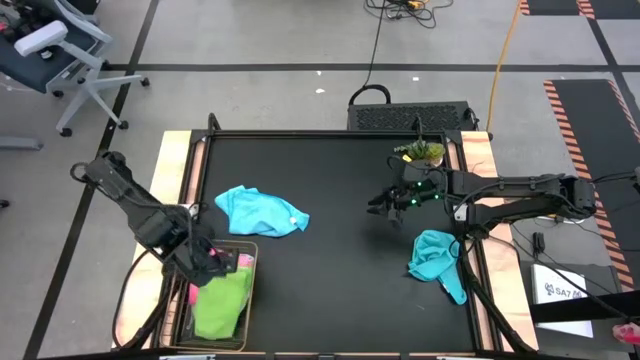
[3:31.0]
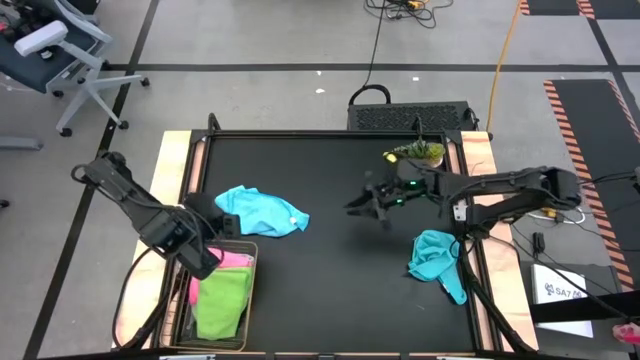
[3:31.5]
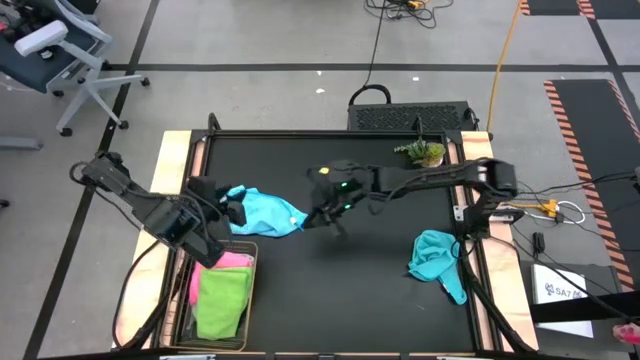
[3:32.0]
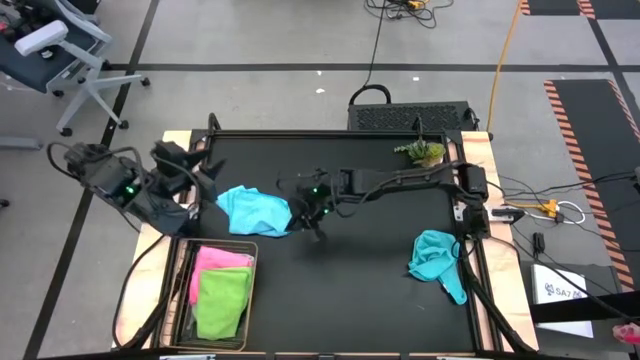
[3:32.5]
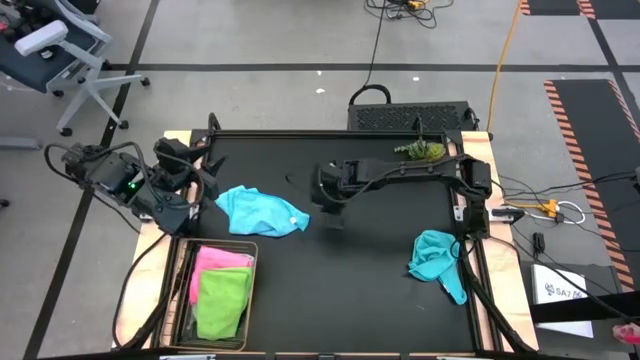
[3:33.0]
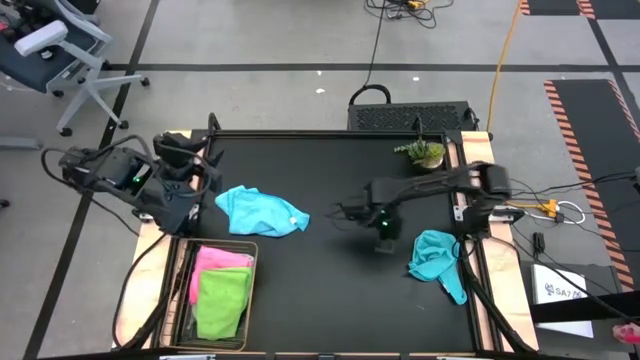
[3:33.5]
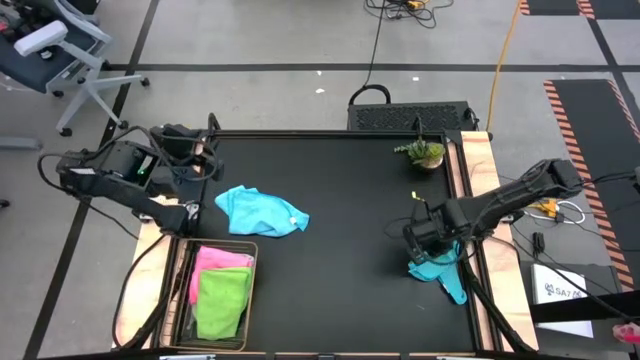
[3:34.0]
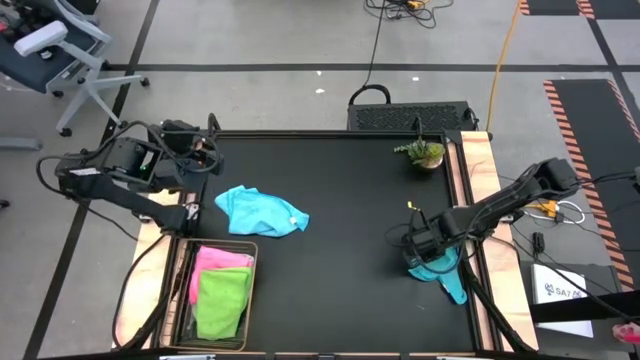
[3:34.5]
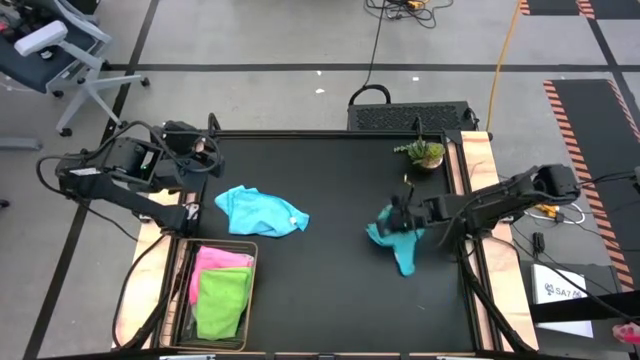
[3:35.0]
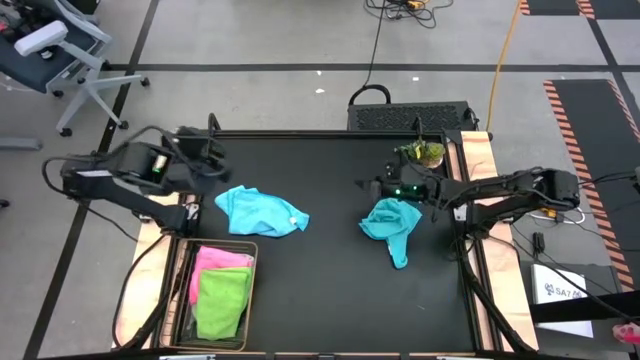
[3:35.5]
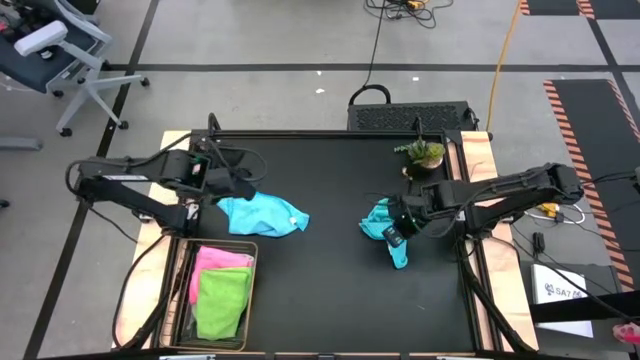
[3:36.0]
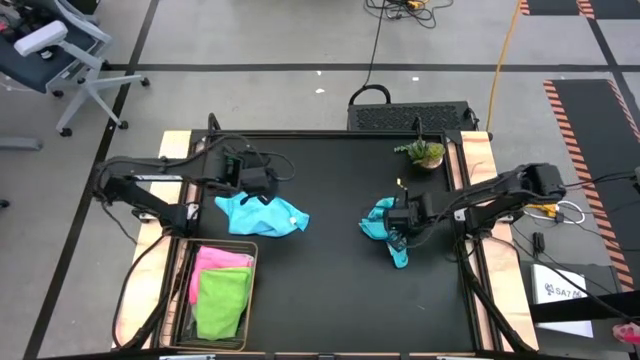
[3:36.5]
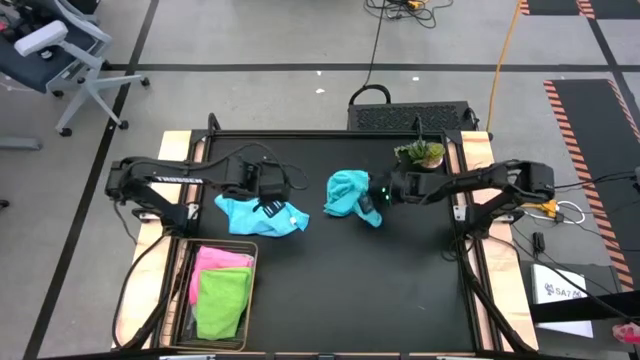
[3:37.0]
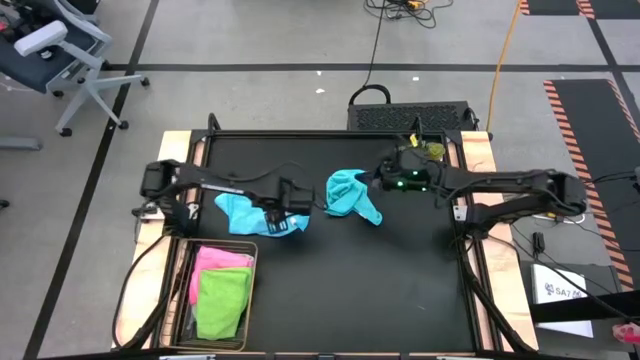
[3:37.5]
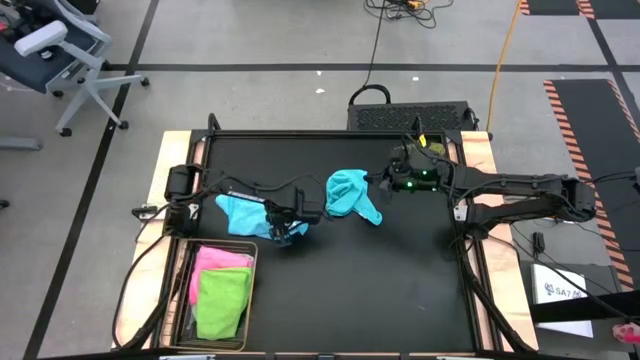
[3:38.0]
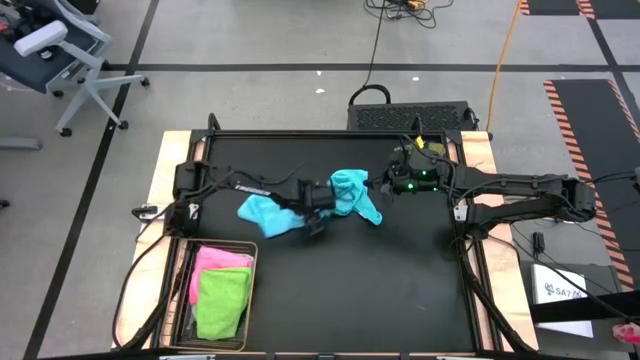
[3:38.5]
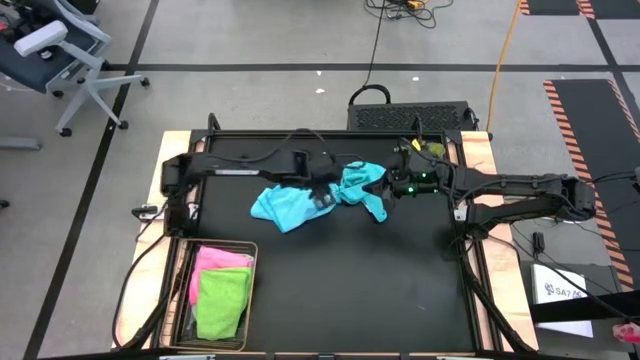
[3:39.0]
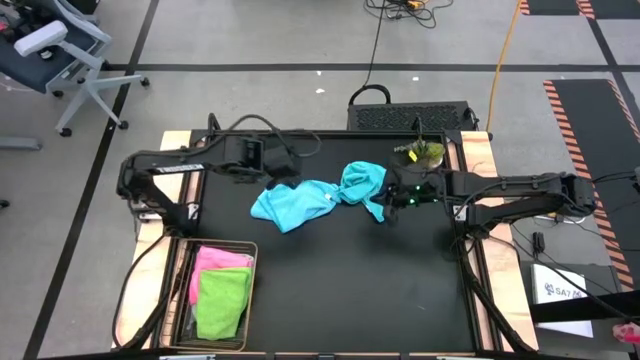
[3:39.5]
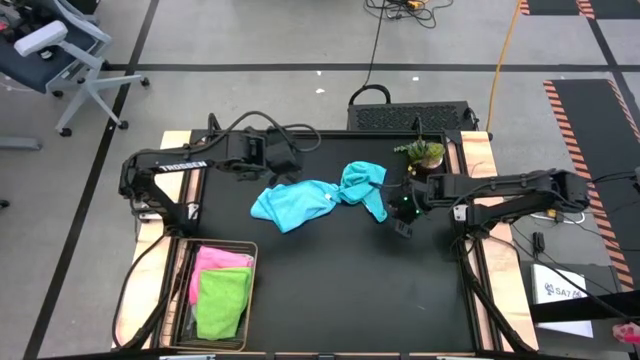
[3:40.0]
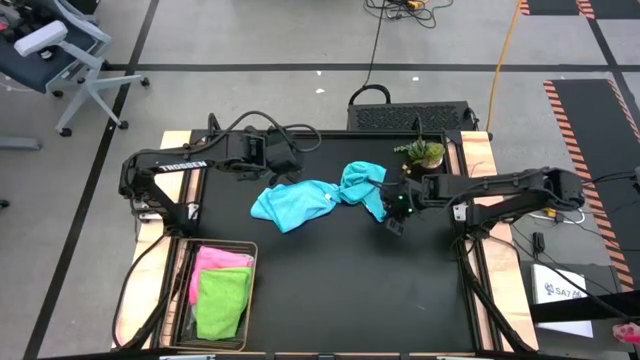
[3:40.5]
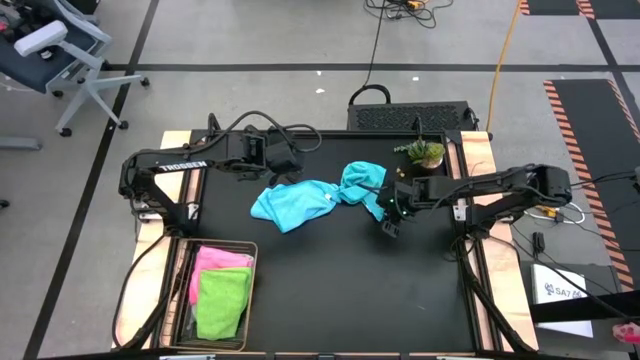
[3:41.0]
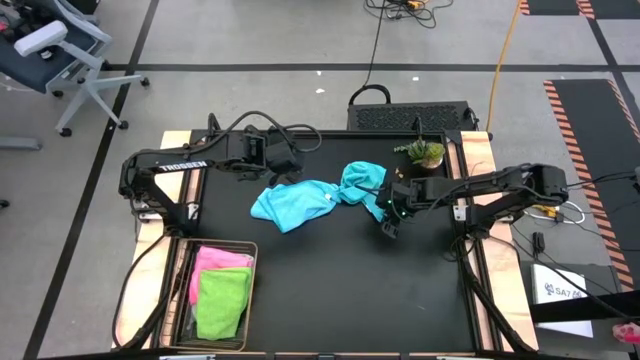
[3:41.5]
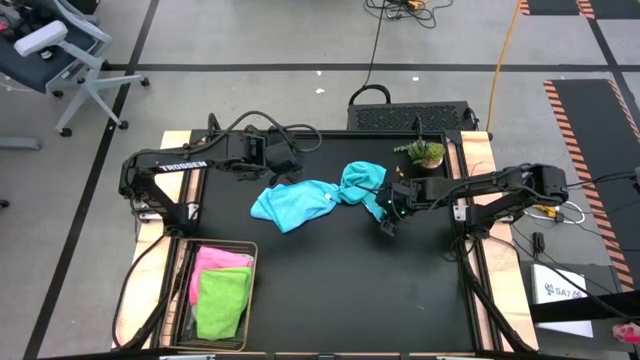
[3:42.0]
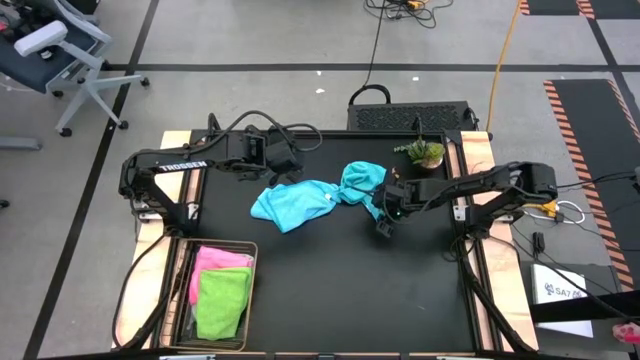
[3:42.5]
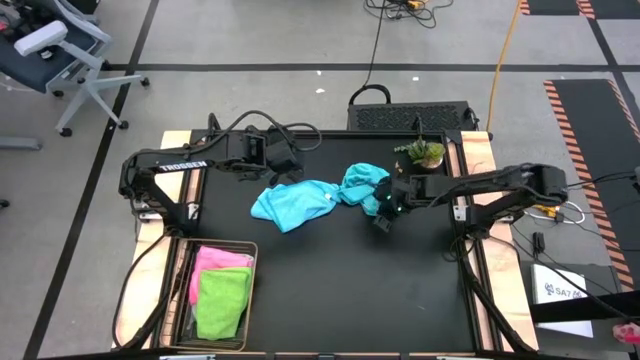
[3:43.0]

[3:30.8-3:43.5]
Task: Fold microfiber towels
Fold the right blue microfiber cloth

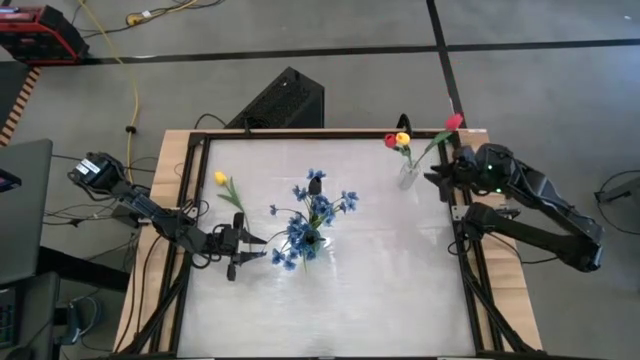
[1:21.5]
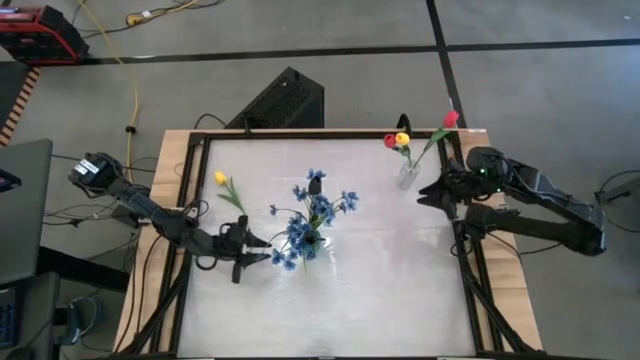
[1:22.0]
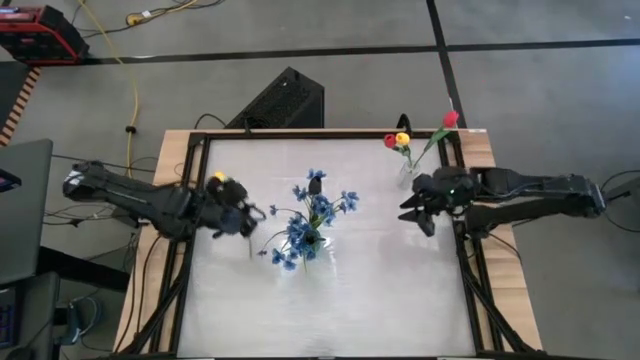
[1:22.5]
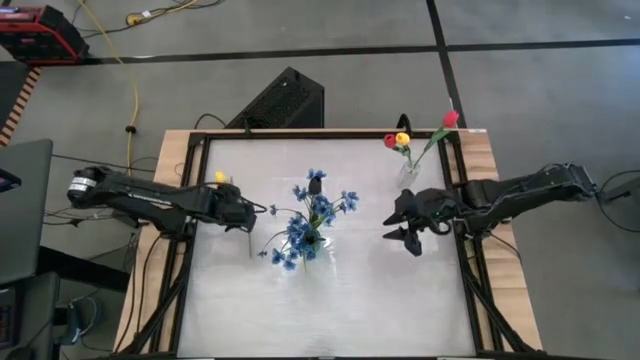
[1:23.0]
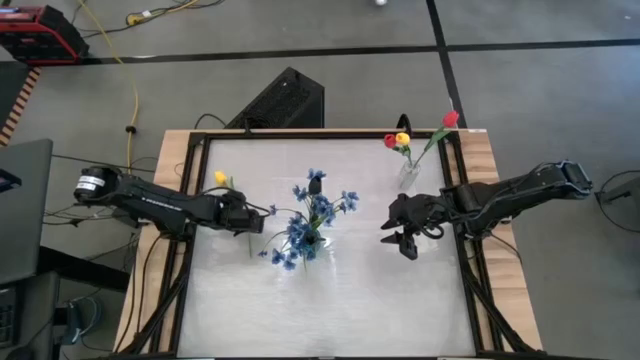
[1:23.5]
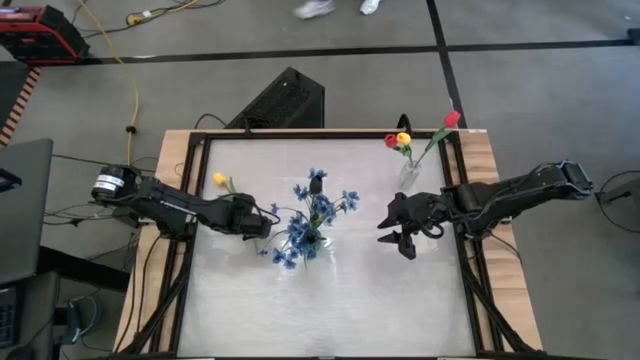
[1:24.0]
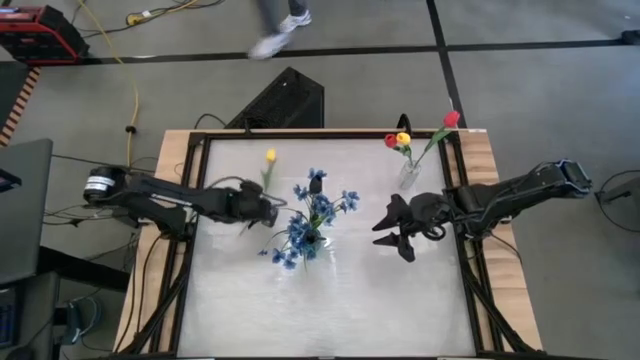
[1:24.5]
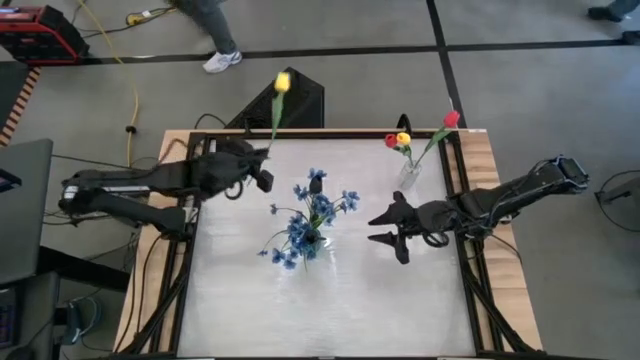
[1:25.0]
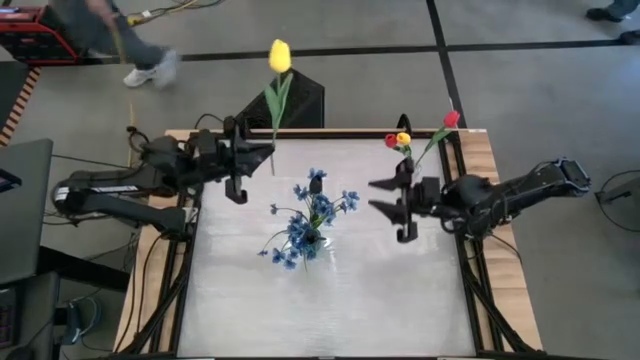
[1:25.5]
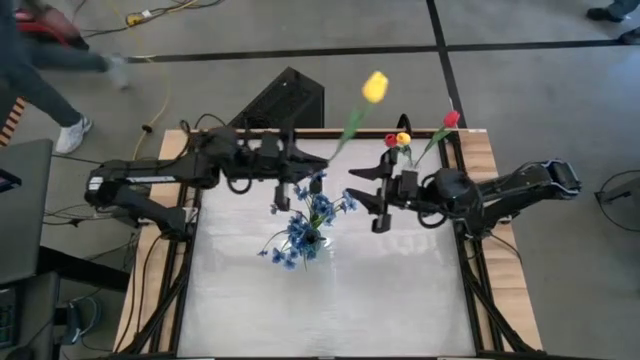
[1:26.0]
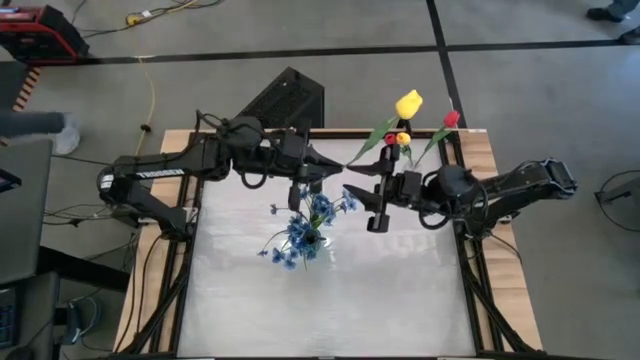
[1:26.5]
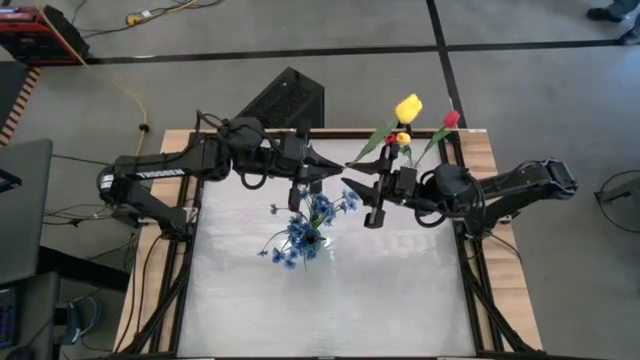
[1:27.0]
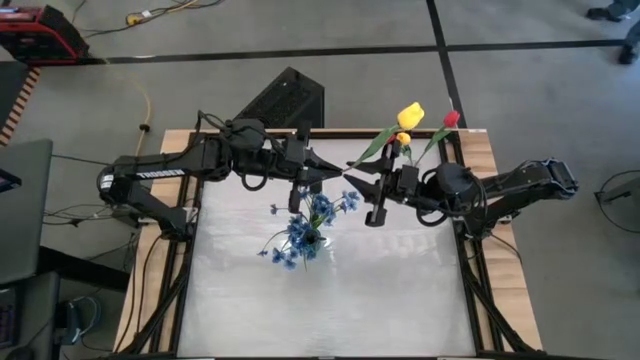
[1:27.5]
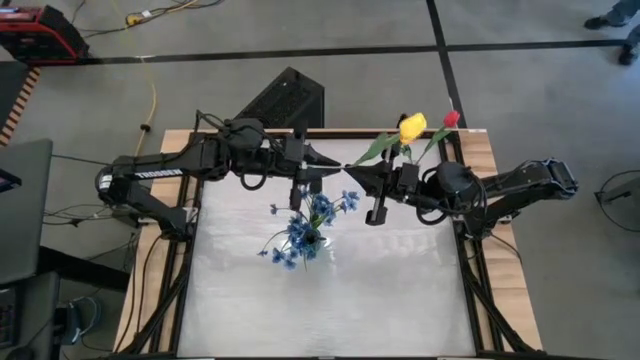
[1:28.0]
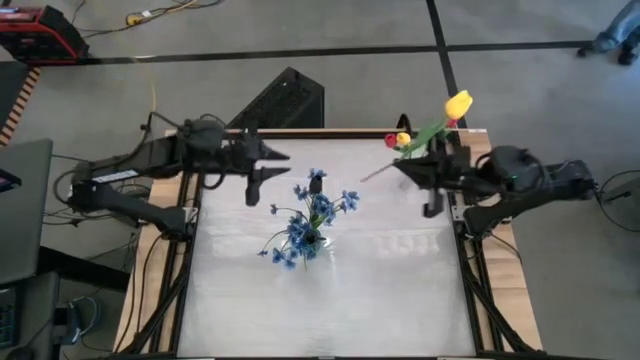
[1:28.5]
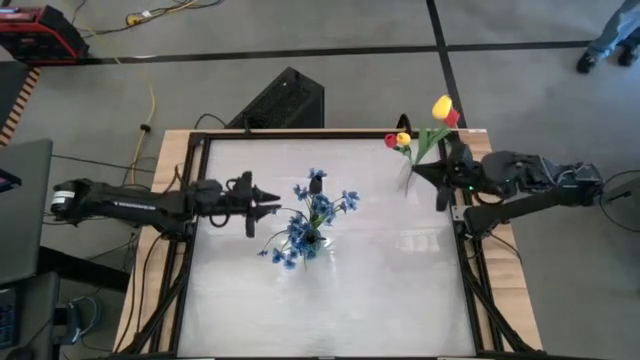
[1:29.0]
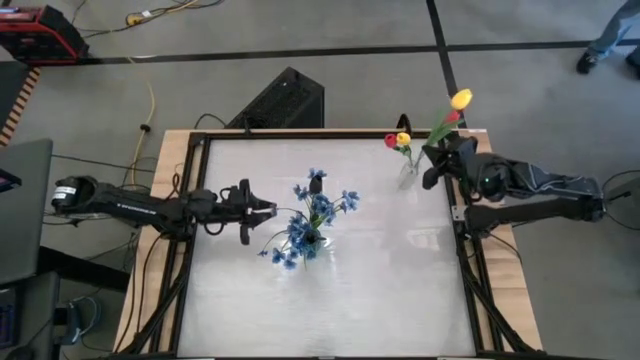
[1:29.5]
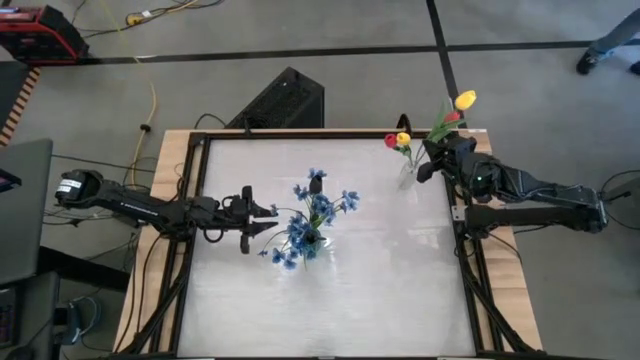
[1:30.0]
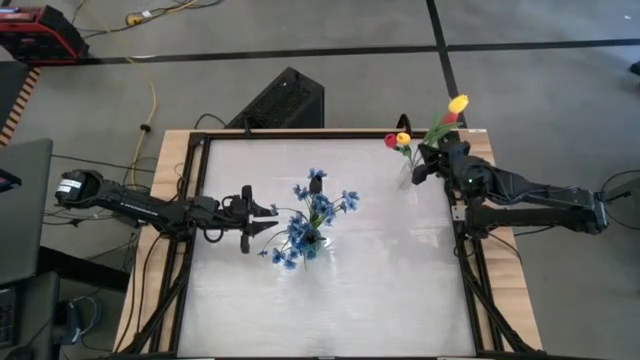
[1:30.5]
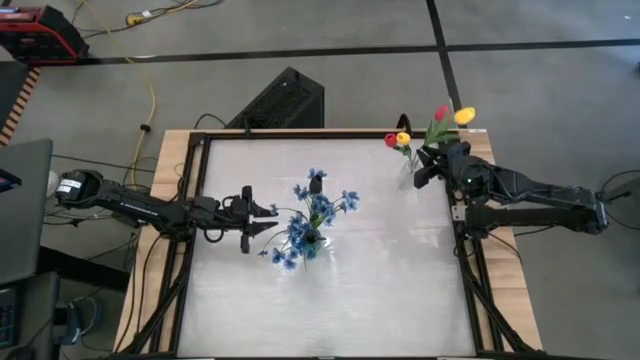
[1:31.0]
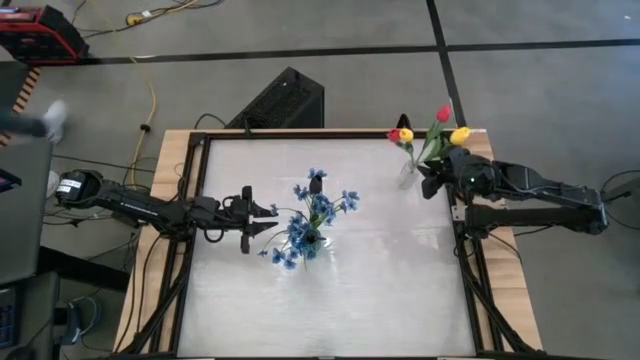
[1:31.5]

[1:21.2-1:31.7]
Task: Sort flowers into vase by color
Put the yellow tulip into the transparent vase
